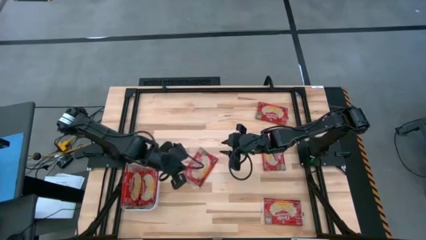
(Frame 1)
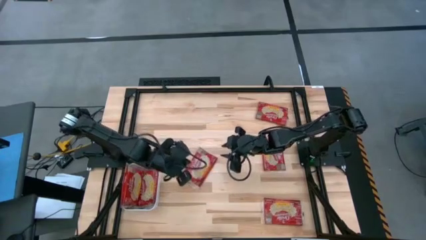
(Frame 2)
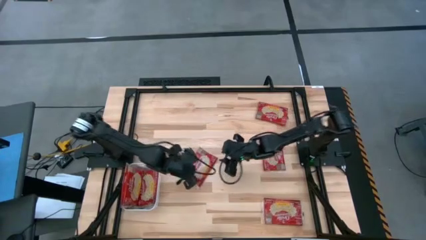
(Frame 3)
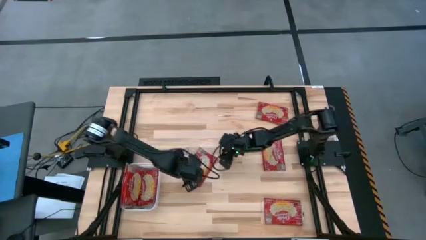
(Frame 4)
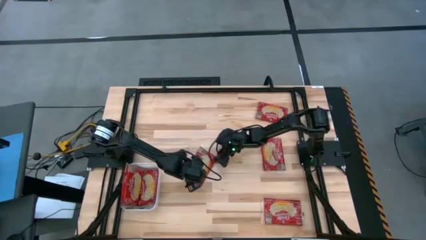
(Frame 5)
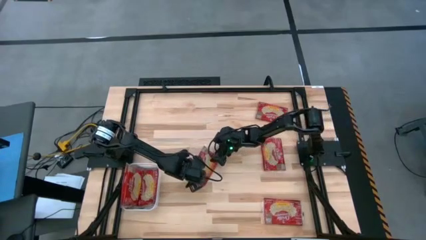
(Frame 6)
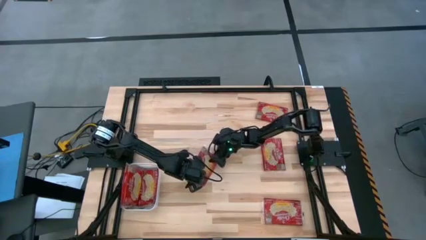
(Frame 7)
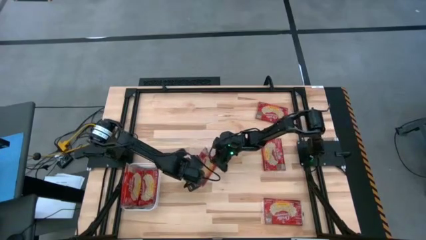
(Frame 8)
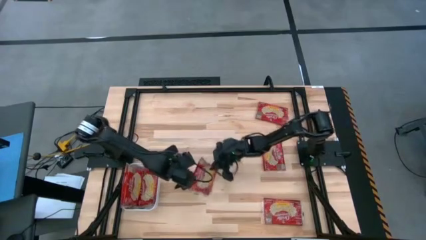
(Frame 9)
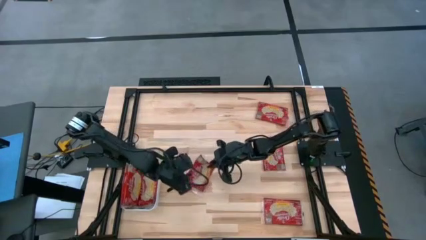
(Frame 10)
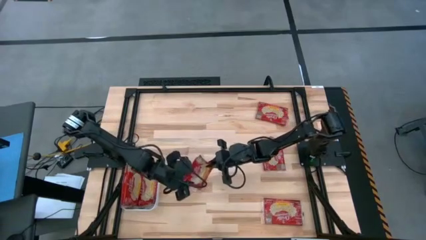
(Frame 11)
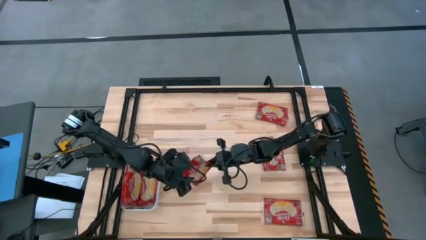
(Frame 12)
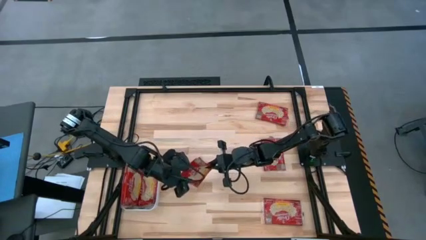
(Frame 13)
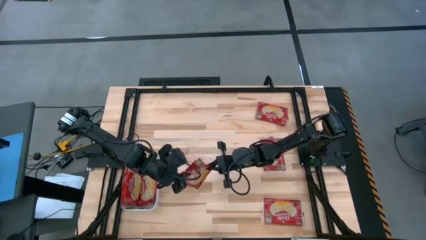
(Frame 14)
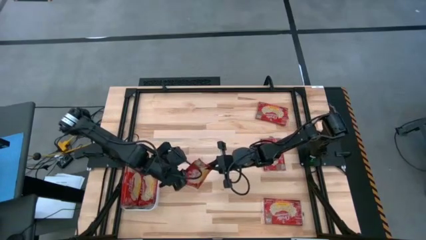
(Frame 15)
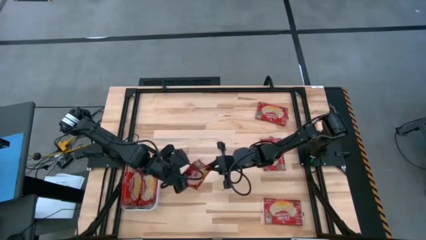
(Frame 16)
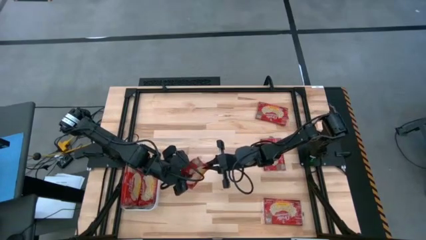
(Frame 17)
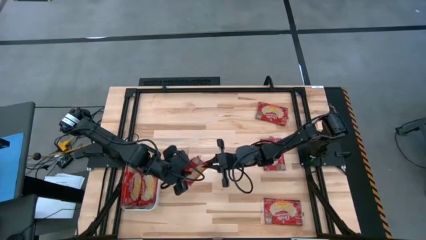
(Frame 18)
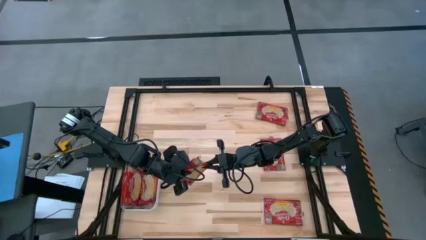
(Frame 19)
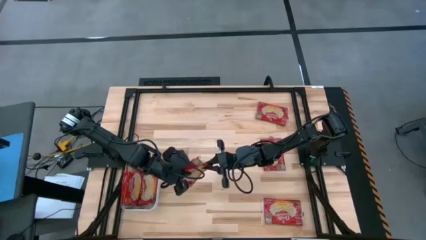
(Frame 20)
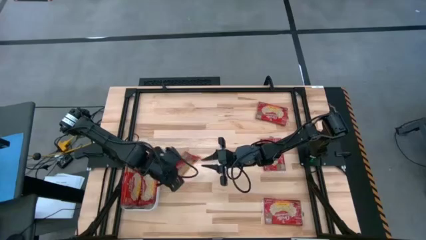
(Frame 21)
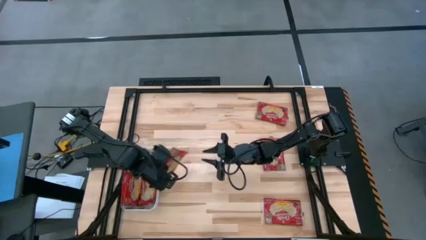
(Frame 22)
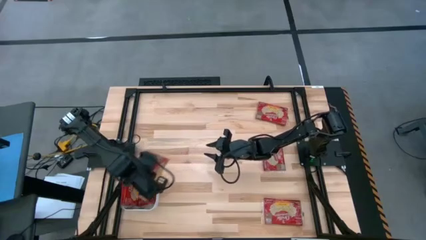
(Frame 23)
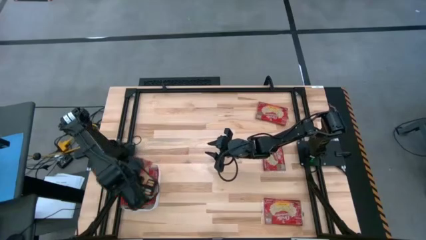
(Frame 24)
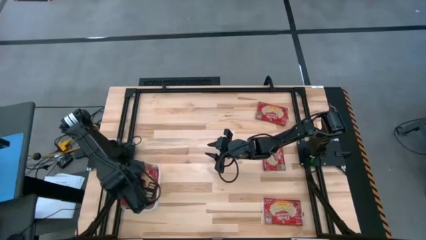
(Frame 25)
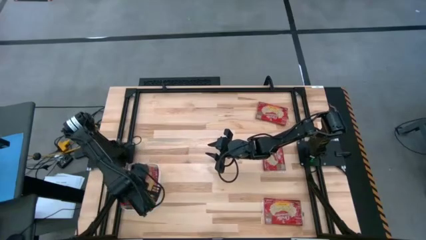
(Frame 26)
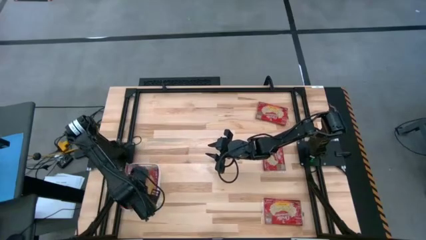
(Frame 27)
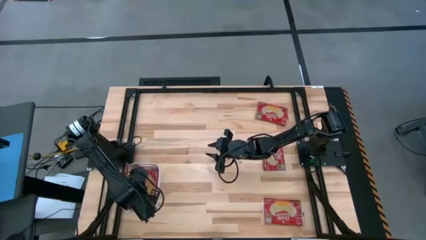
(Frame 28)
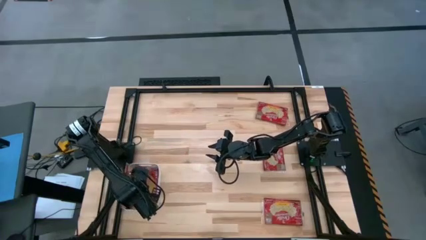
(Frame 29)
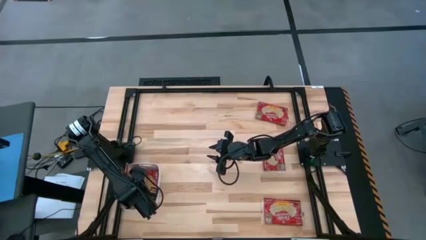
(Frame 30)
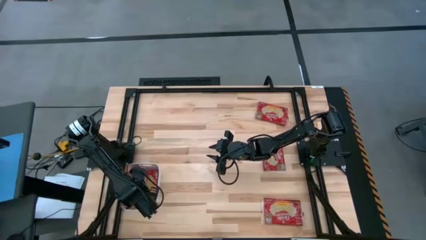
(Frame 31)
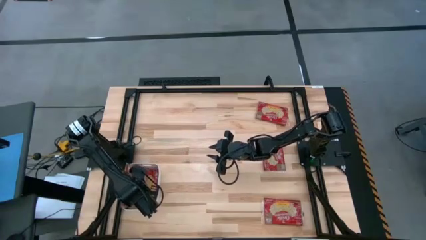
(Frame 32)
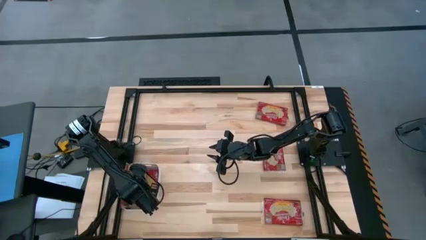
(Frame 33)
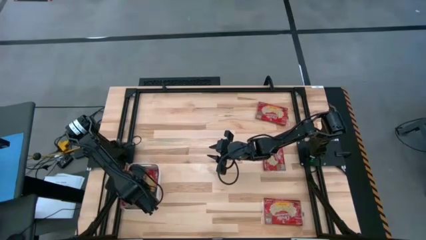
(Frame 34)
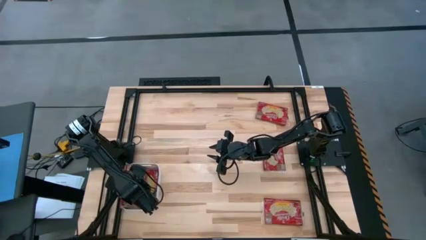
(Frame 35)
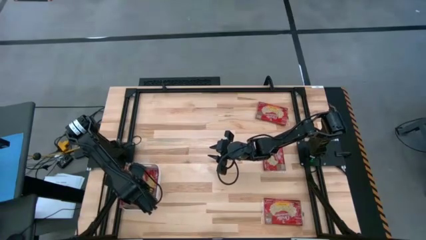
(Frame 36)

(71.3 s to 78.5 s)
Task: Sort popcorn bags into baskets
Put the red popcorn bag into the white bin

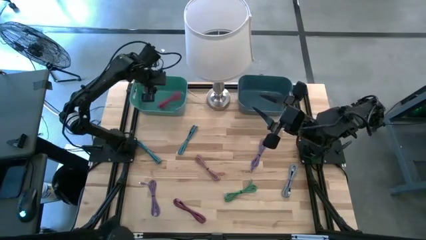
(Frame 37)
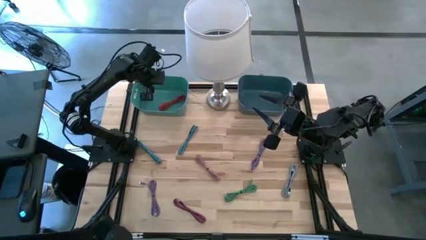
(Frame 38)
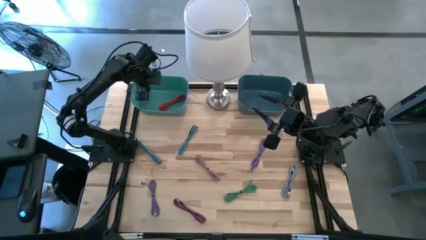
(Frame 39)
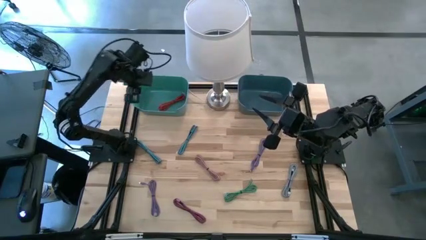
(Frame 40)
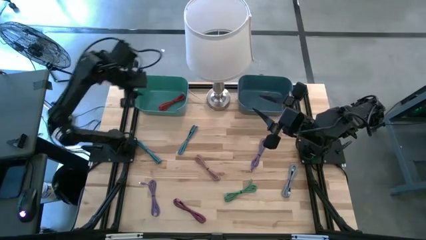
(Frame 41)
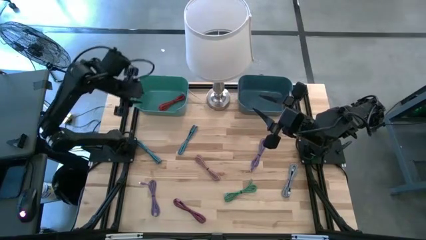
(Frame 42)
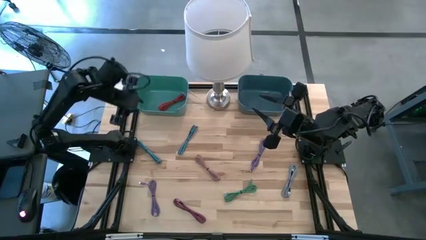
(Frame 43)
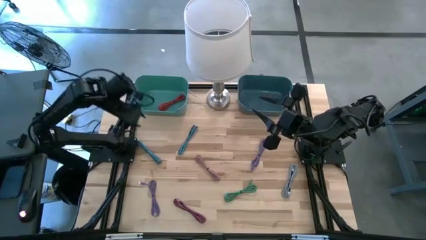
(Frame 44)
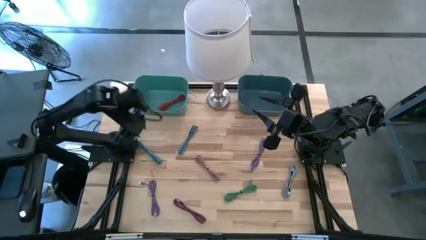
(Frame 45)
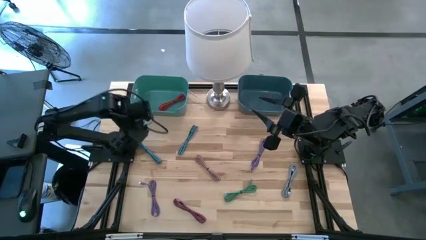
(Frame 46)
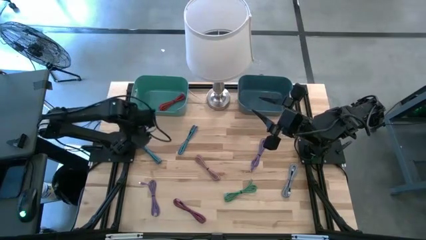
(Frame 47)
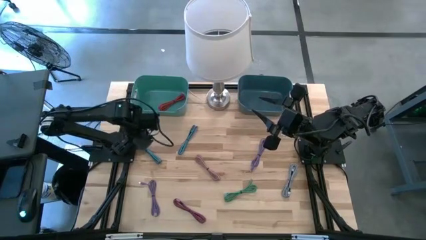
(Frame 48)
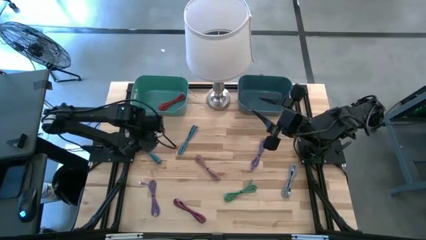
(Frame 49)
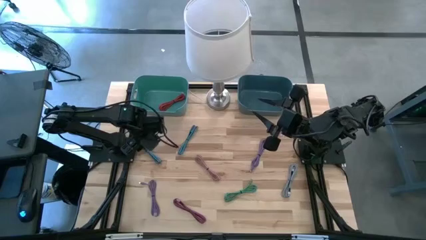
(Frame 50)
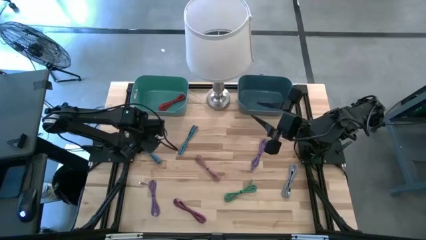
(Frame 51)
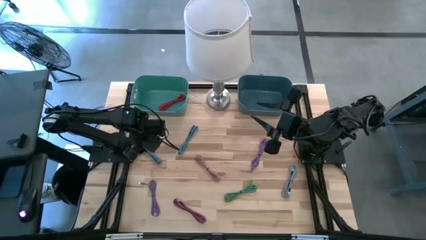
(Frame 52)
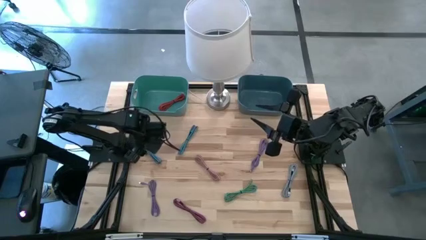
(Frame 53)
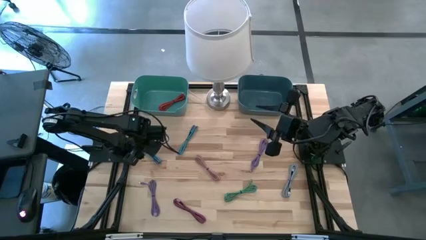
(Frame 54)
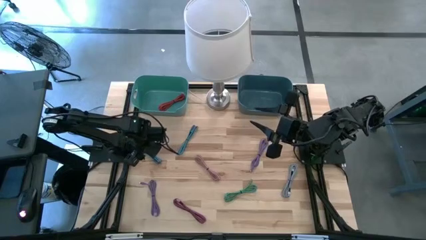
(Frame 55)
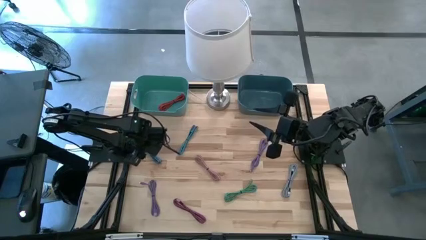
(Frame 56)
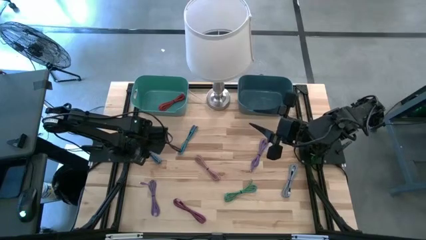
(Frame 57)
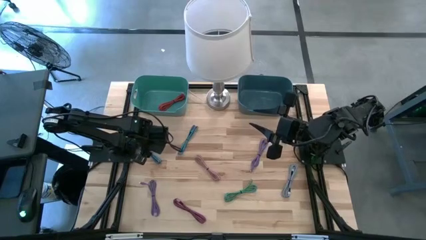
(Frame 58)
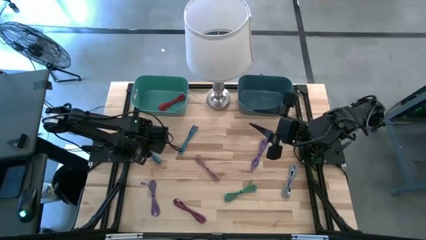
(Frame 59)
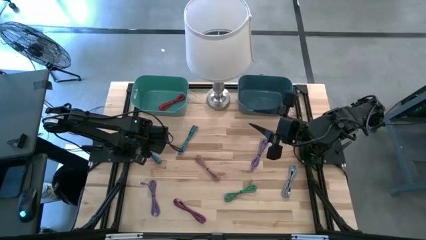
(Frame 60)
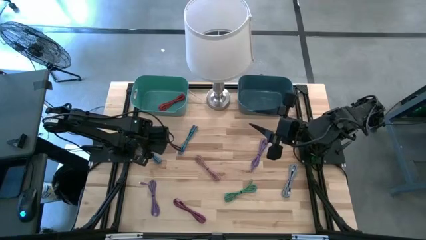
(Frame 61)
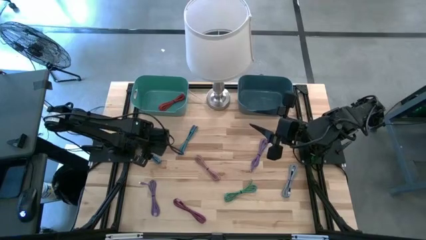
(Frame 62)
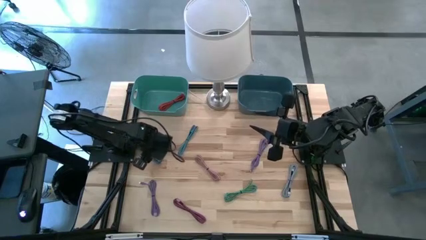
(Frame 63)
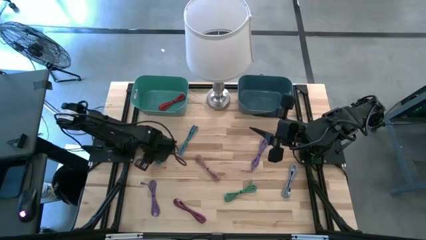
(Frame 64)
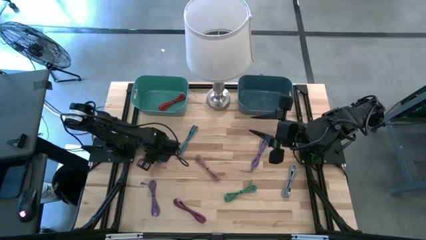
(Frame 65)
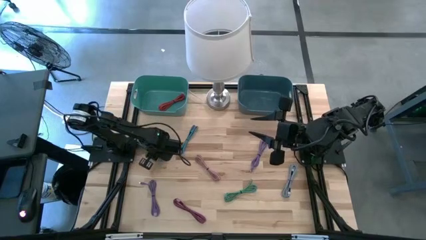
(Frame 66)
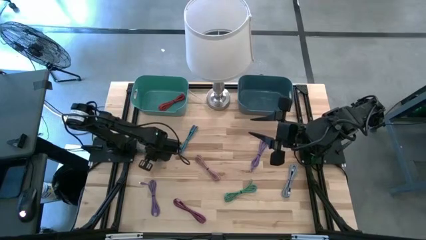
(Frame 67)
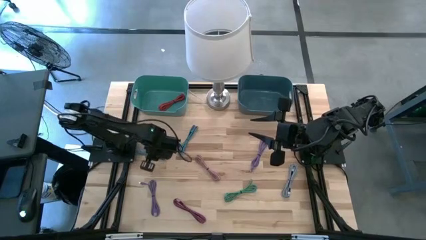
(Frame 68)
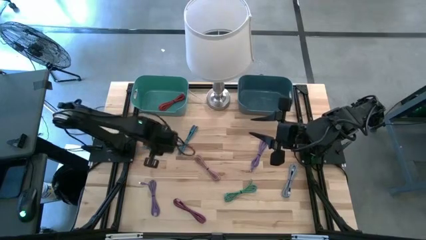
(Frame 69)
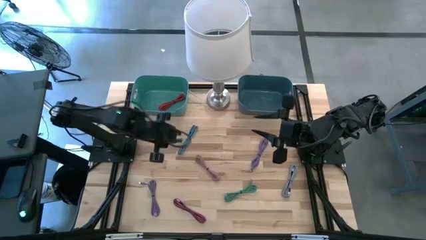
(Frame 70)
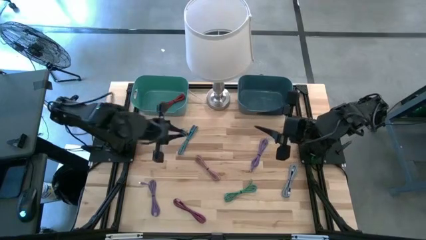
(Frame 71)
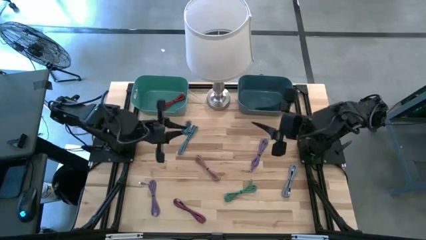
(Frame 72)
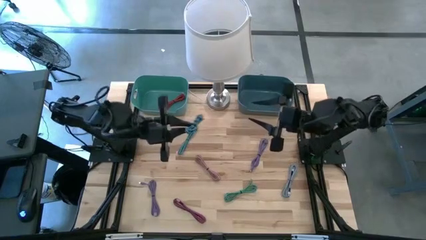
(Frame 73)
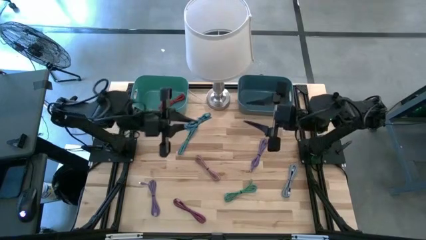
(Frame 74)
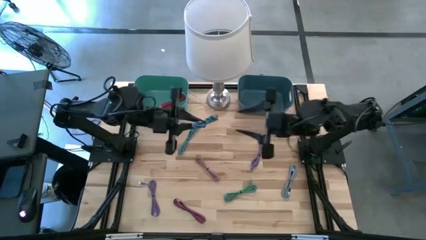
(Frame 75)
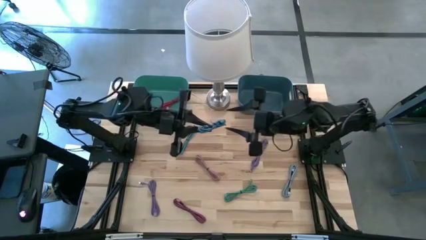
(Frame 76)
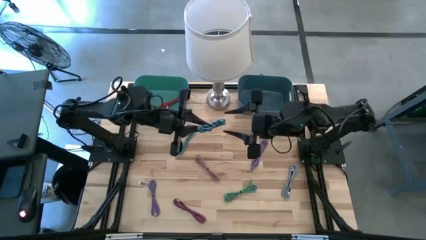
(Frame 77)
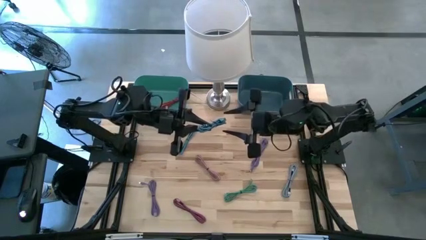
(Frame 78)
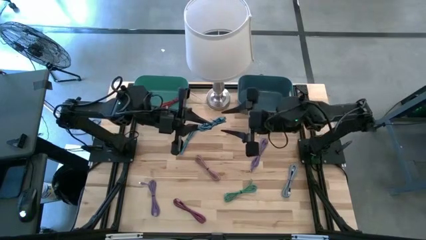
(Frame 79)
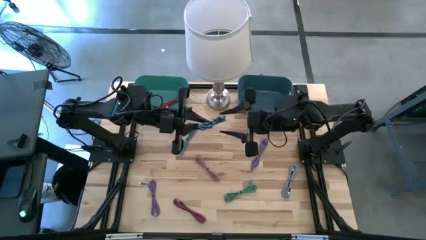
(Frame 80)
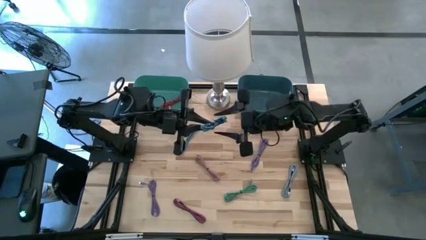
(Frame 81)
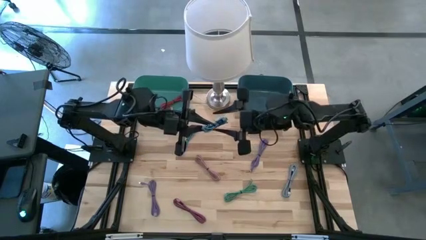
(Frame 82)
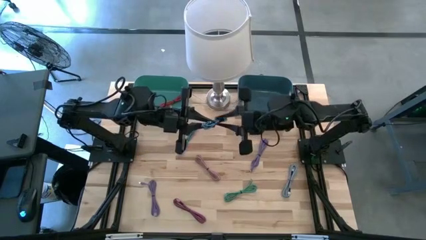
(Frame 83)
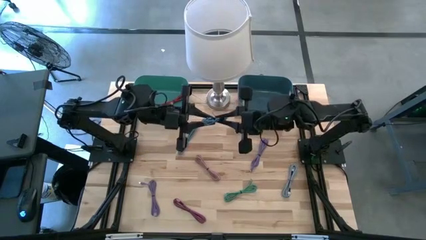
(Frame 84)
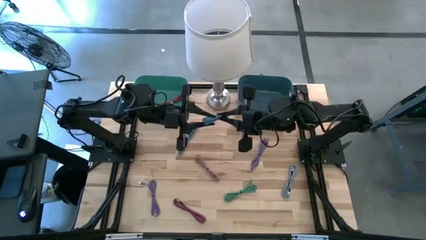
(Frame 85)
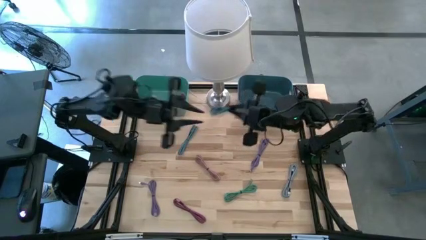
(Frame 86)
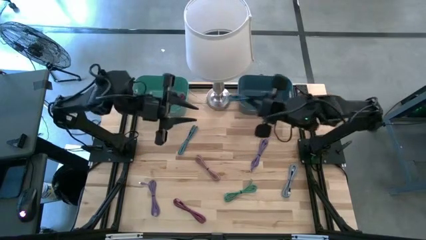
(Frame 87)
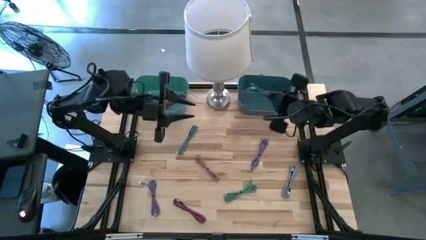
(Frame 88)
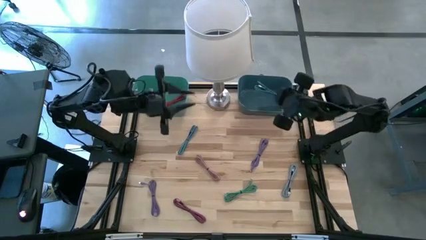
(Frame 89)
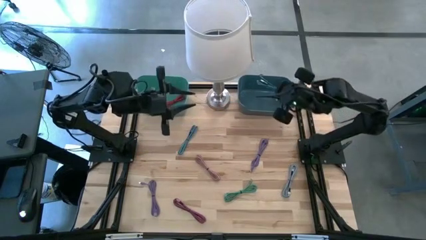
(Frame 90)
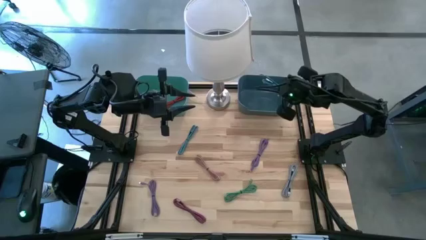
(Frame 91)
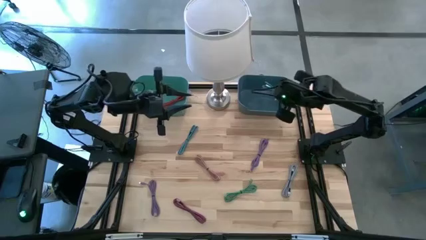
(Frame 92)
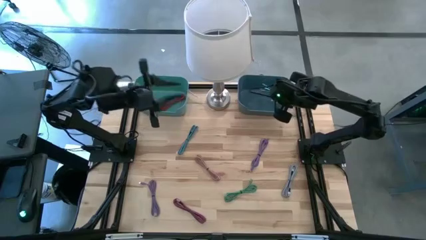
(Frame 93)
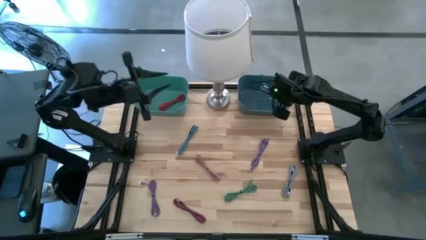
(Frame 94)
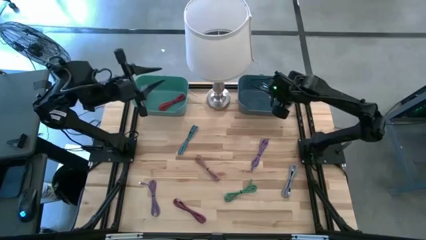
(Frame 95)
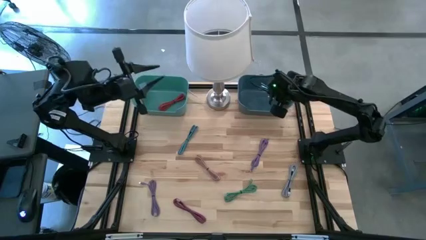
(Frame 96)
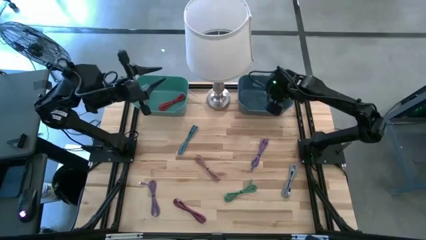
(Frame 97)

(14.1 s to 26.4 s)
Task: Pick & Place USB Port
Put the left blue and black charger cable into the blue bin
